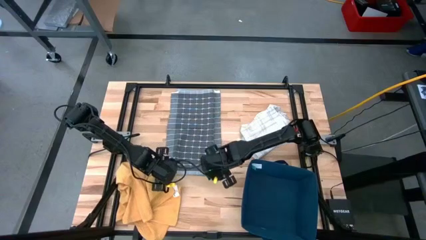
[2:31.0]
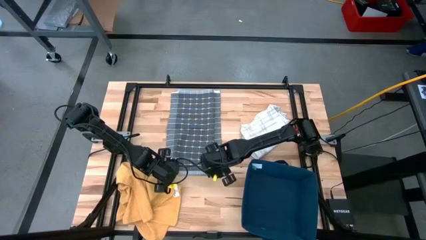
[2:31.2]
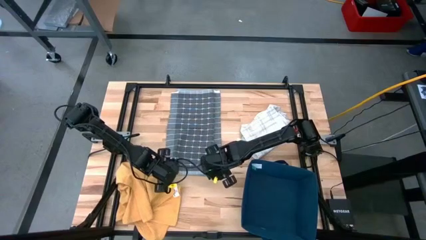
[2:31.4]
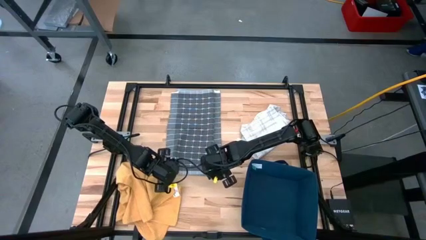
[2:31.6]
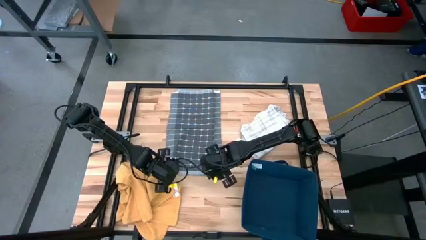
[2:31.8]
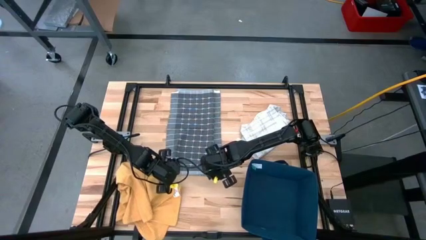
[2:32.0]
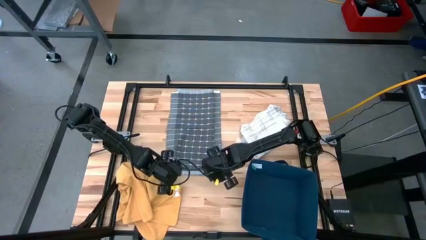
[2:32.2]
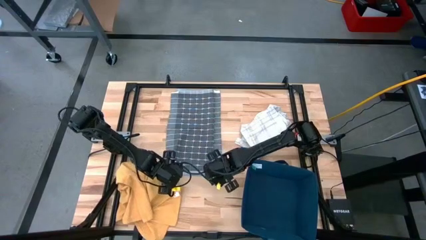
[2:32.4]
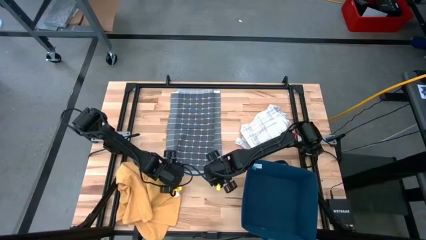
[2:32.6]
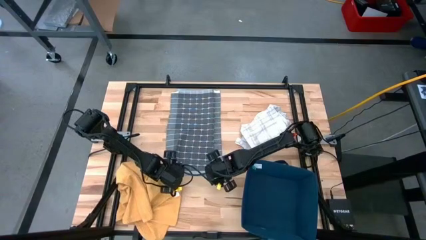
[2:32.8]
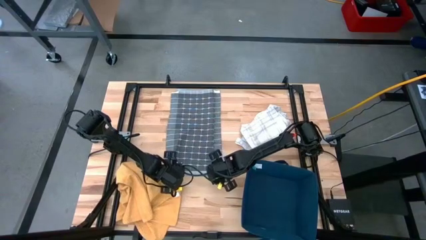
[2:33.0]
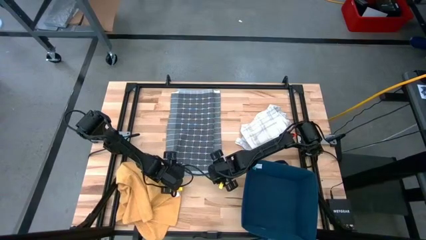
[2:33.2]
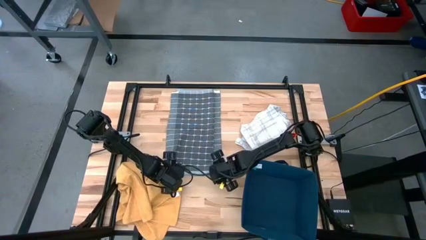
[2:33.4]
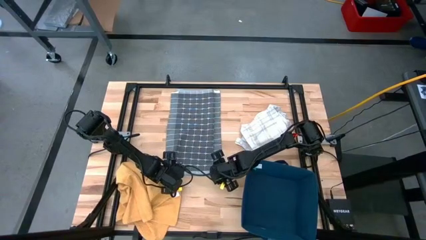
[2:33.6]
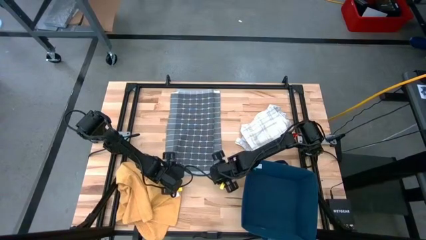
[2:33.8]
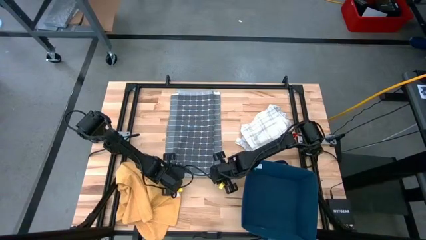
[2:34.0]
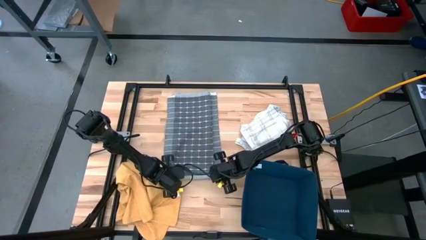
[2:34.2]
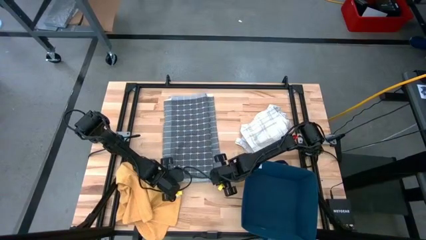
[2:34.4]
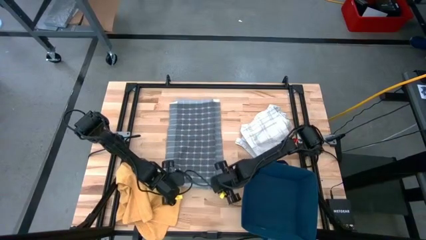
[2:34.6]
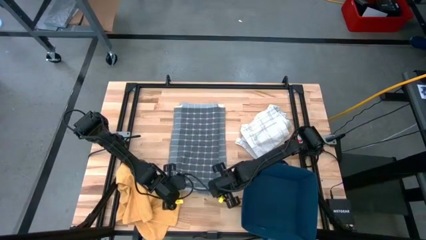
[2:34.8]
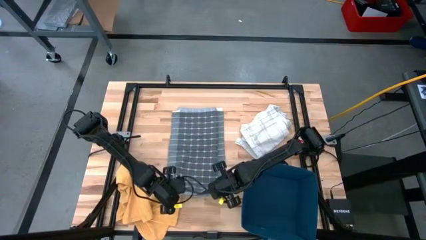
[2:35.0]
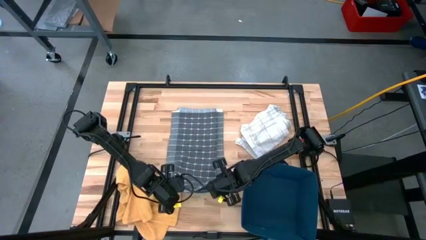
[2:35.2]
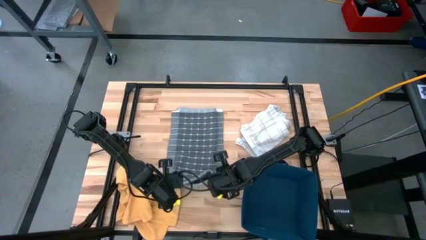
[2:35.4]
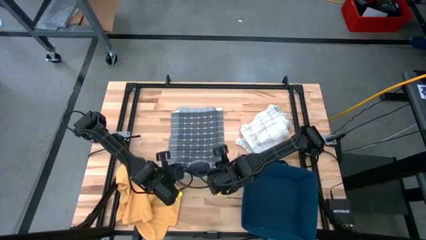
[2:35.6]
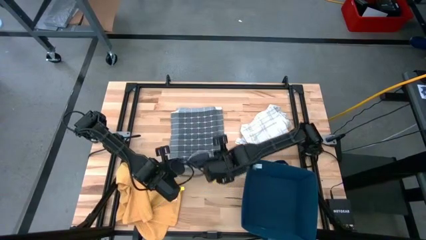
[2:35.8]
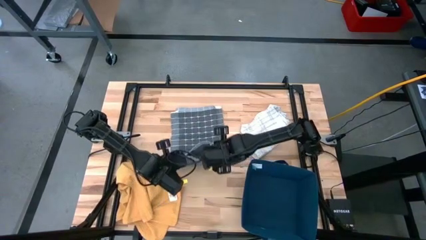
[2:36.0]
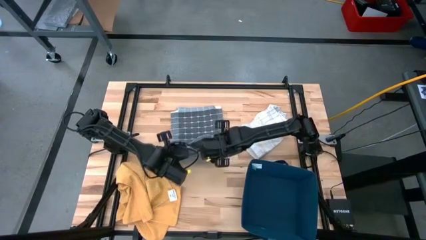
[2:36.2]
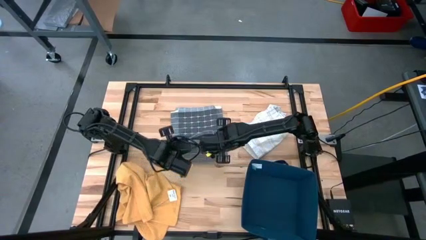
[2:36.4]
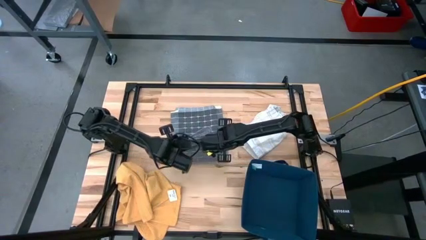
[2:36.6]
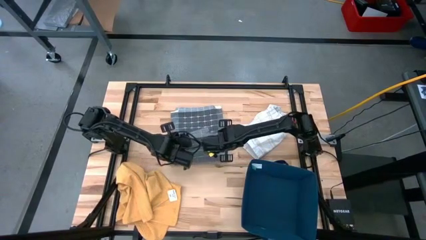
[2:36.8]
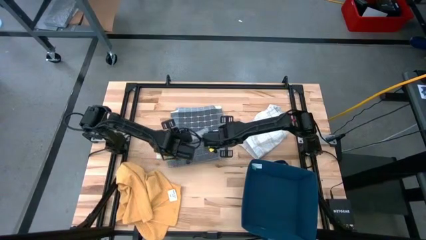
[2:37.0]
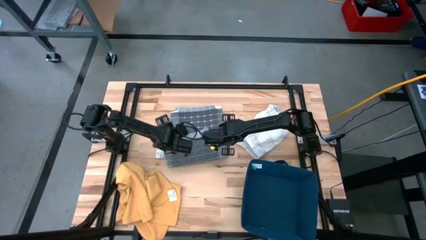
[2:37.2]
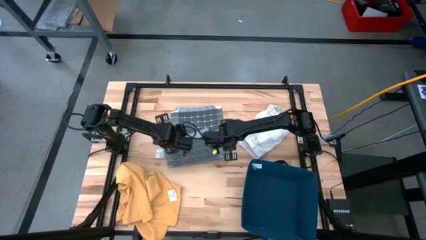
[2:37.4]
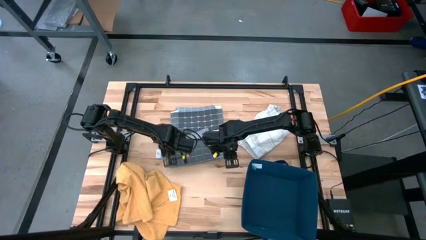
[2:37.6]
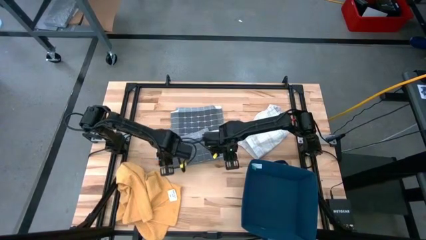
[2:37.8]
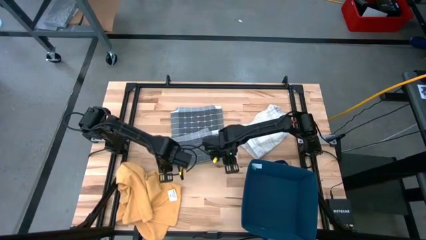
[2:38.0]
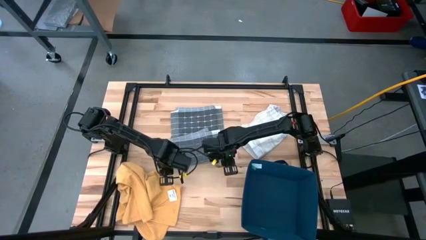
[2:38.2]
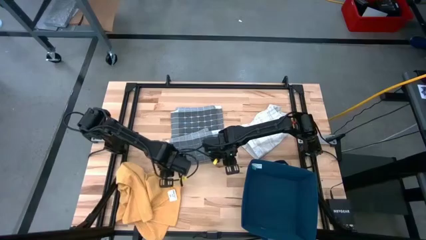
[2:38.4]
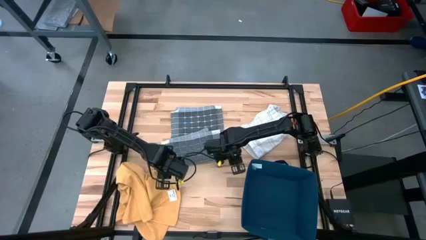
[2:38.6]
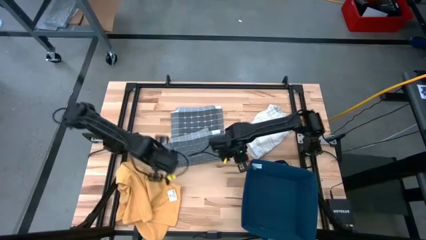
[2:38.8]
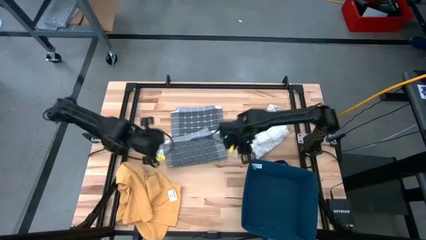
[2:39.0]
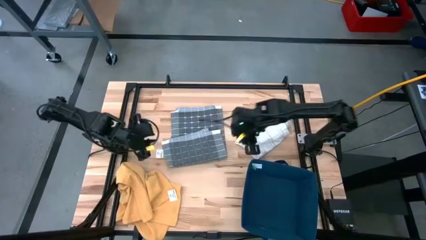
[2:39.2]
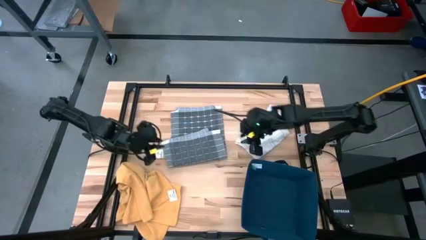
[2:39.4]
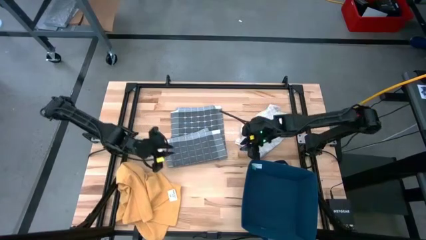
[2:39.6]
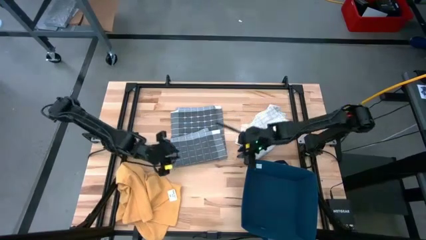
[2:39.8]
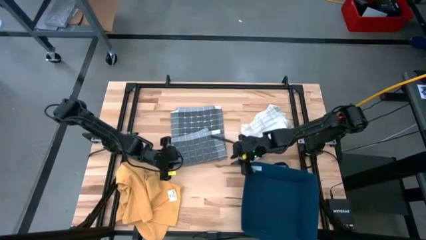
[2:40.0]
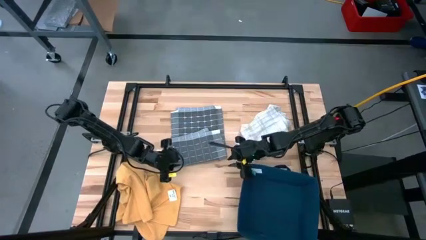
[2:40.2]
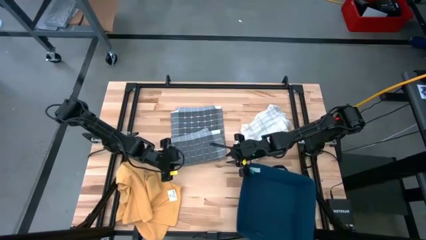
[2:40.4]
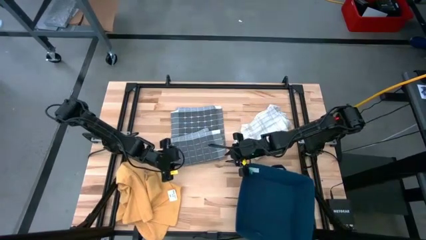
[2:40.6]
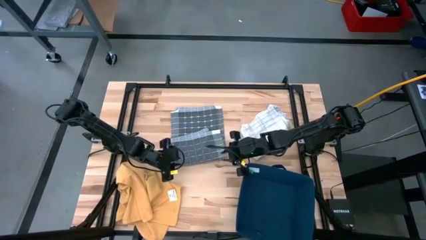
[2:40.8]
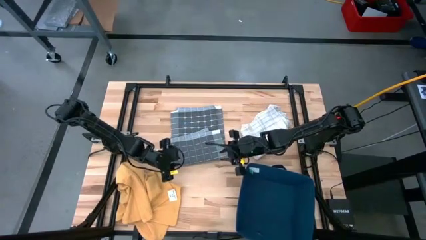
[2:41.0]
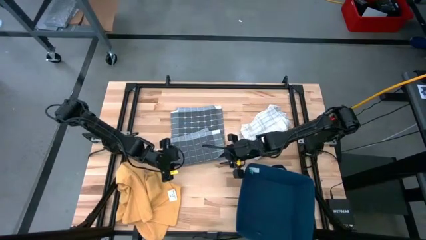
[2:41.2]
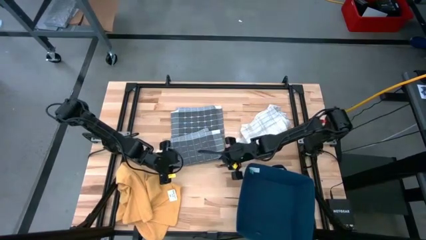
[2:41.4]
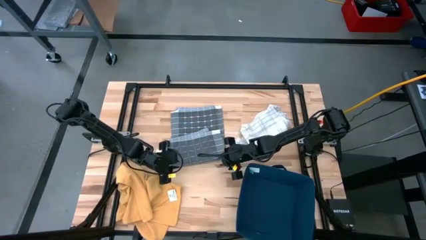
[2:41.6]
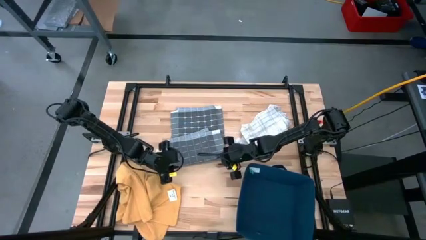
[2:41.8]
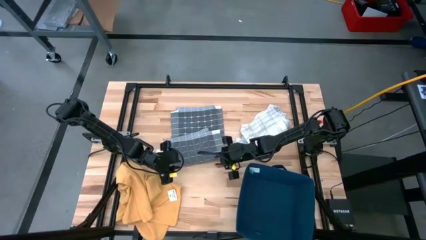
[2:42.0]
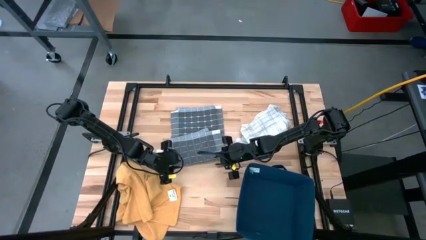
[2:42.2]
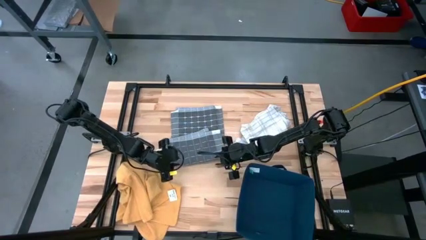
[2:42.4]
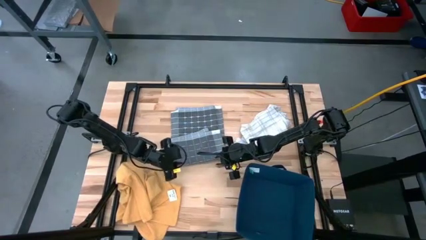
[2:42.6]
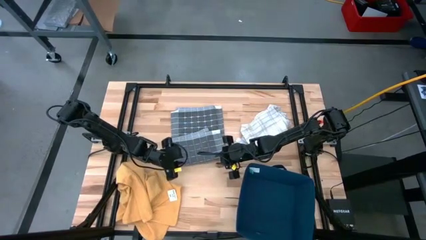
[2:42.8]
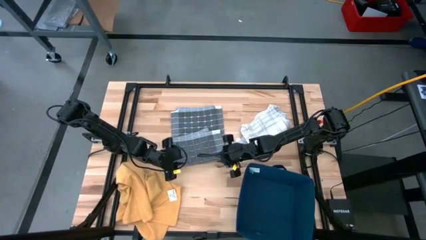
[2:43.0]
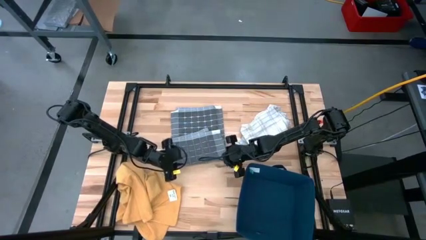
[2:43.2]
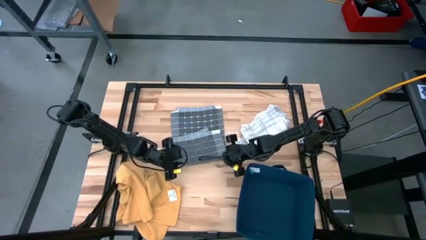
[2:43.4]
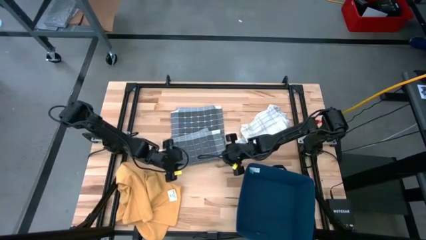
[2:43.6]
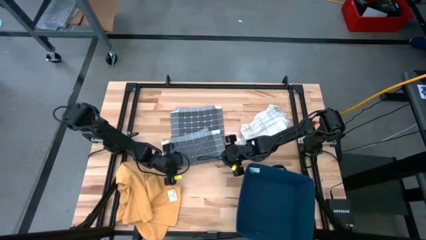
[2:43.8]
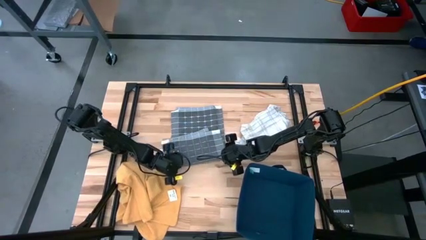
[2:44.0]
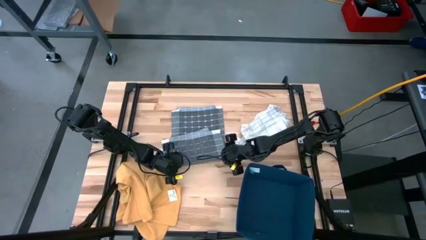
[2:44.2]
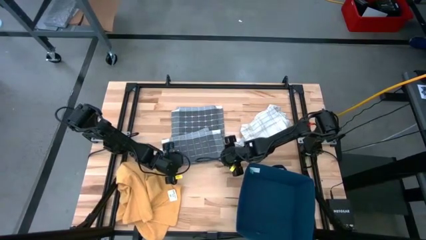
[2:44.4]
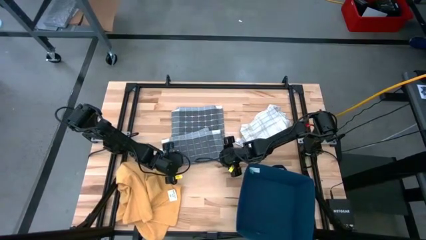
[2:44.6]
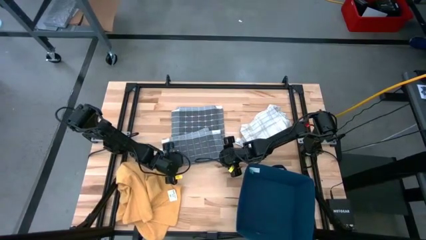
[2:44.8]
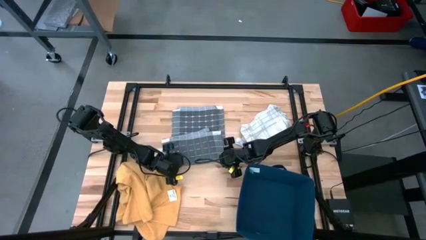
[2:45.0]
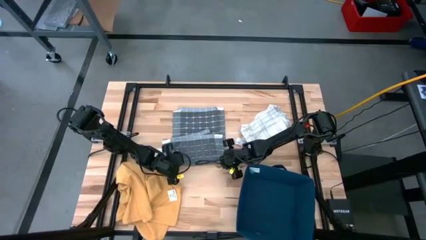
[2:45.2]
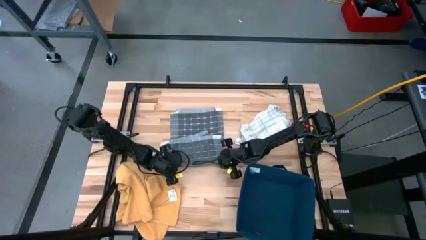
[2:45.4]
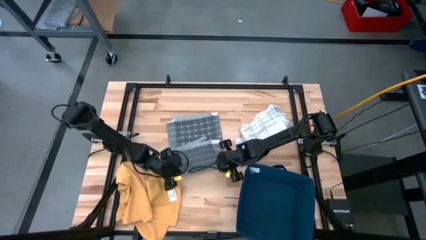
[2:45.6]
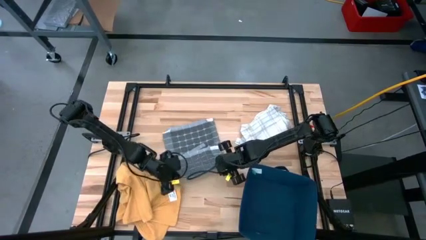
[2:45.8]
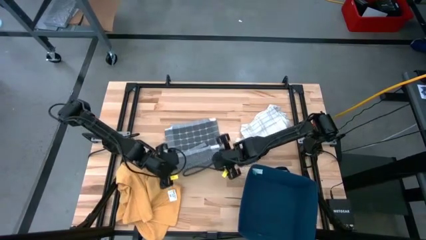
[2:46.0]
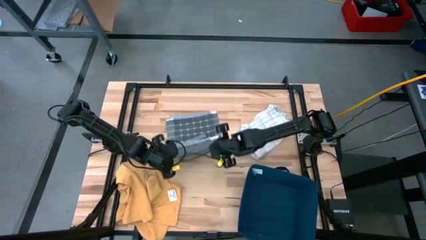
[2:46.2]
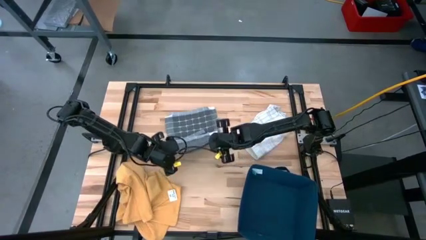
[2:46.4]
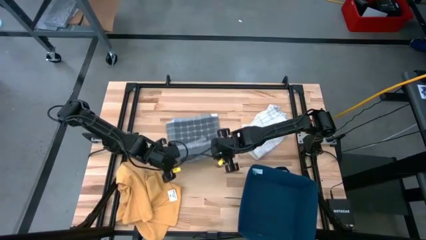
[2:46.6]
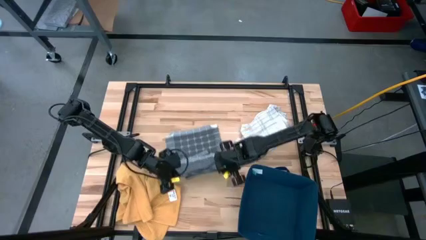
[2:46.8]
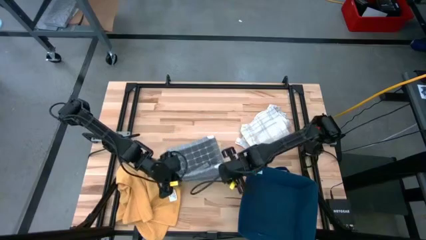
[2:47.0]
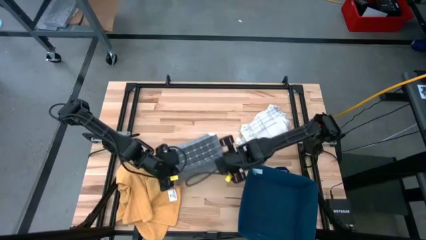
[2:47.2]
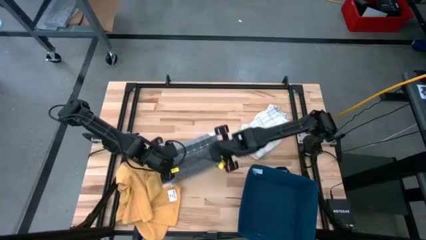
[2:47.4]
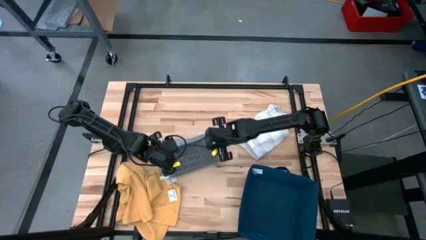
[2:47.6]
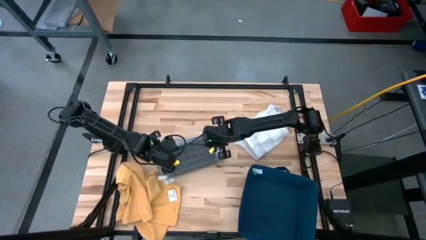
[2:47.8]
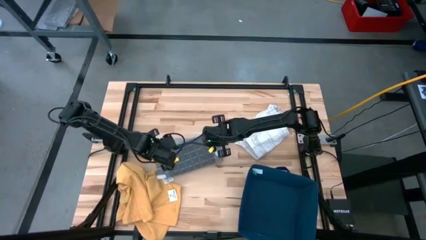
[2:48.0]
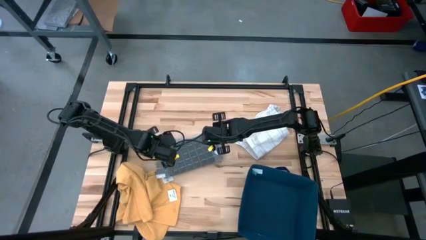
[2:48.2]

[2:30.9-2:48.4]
Task: Fold towel
Fold the gray kitchen towel
